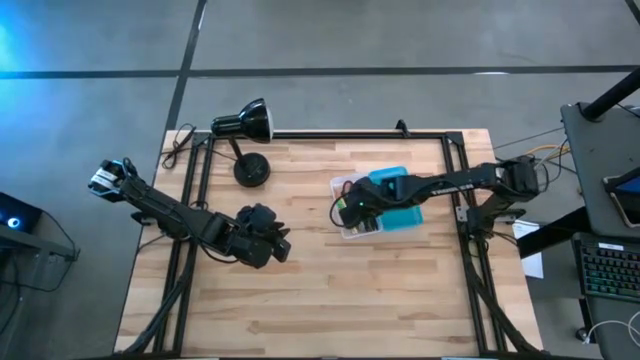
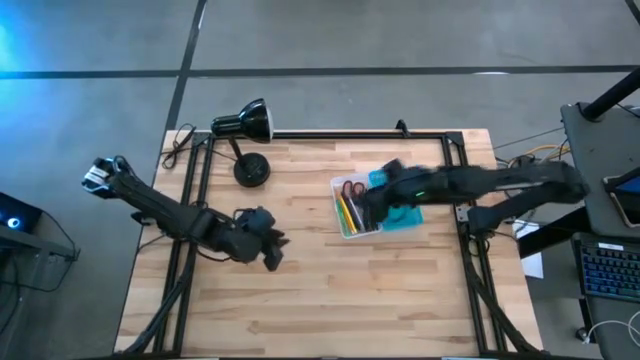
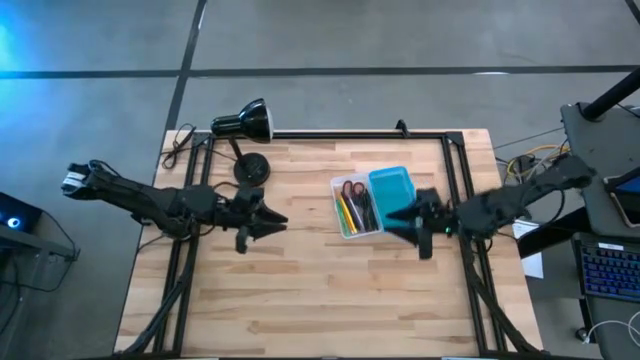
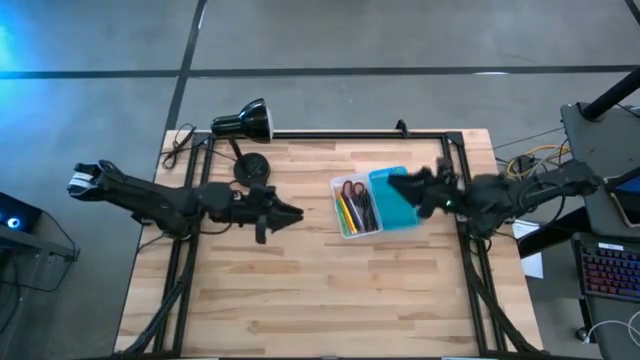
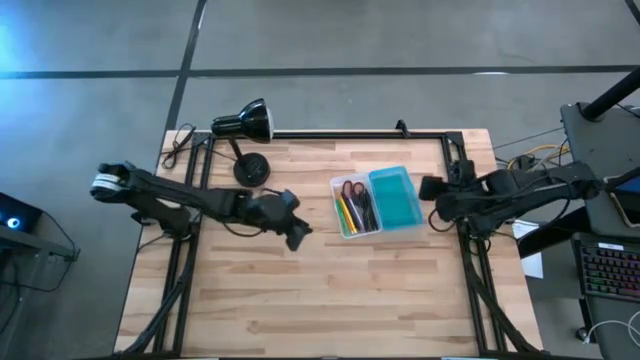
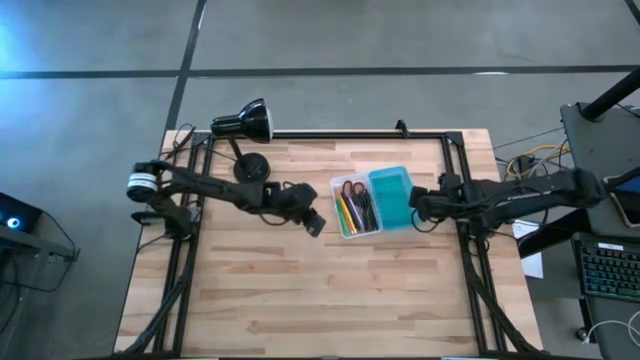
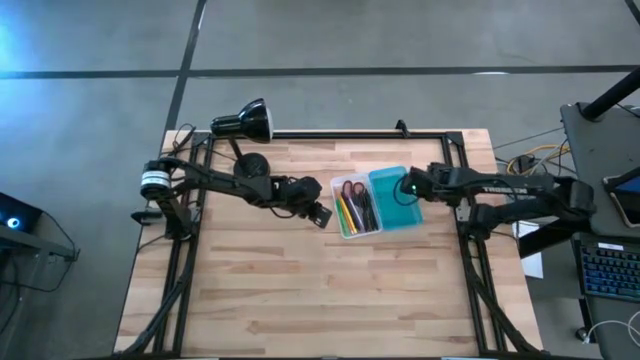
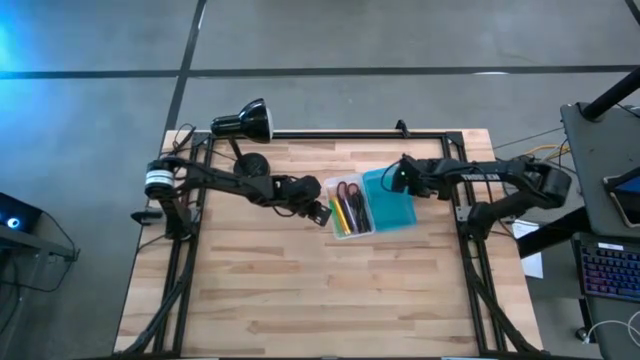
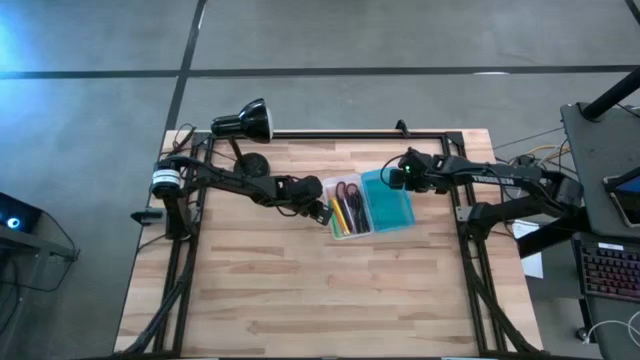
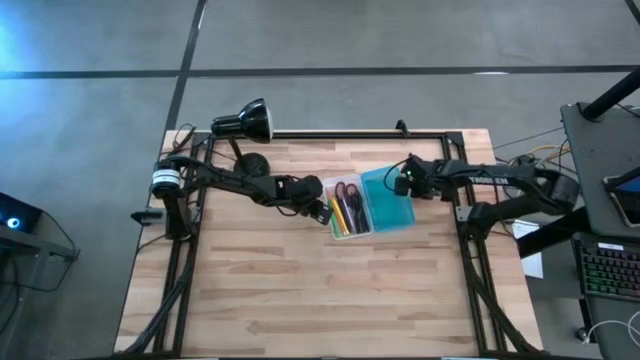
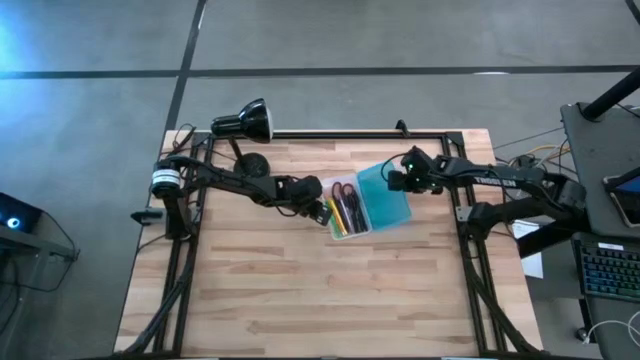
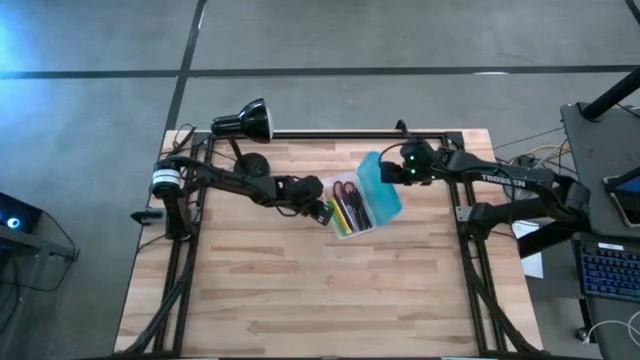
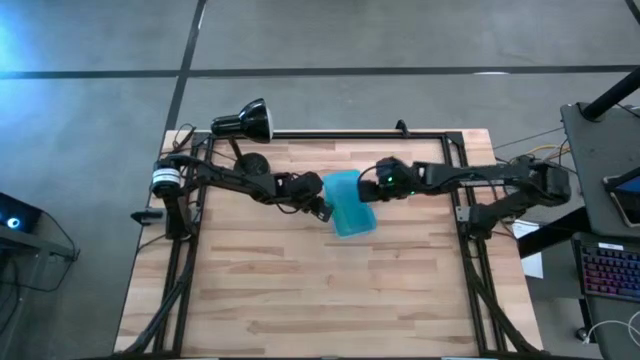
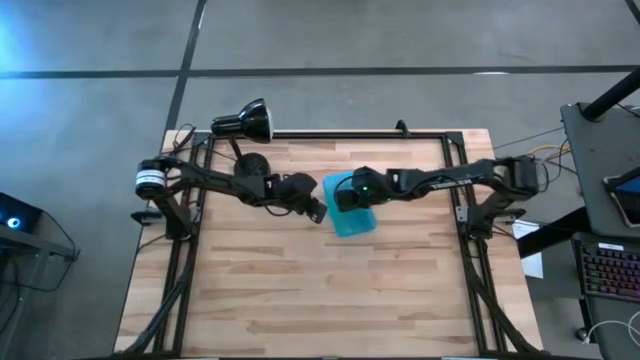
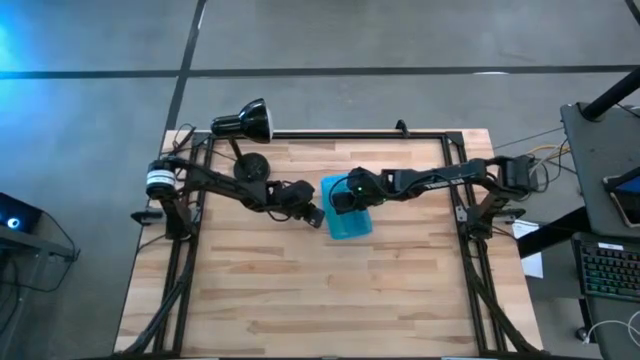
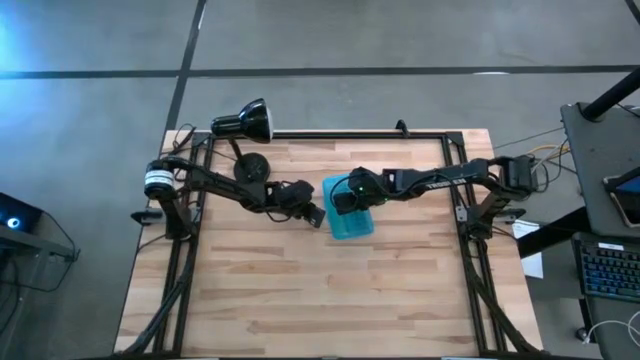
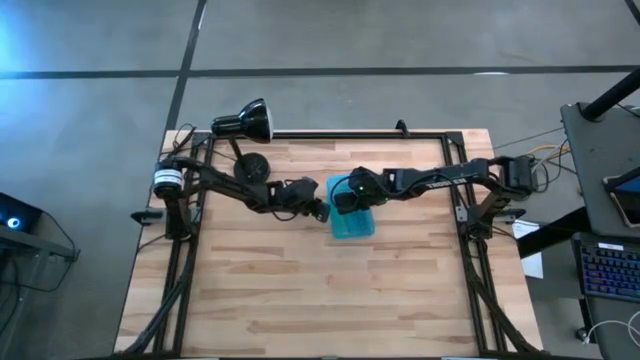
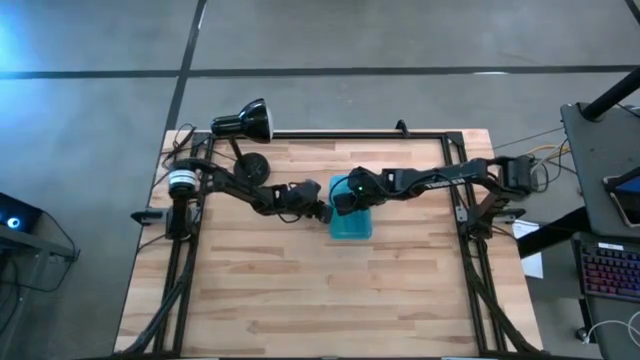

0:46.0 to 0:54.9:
Task: Pick & place school supplies into a supply box
Close the blue supply box

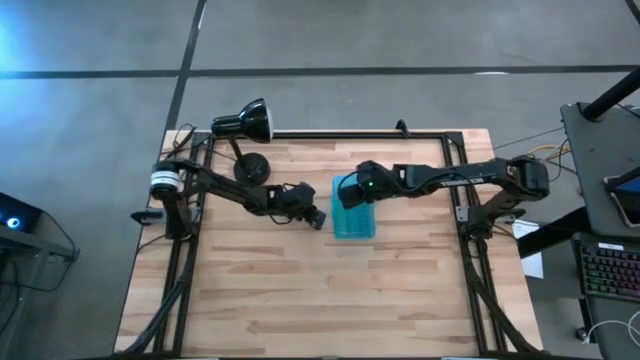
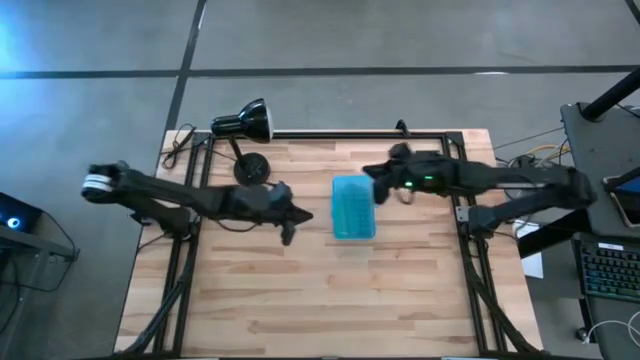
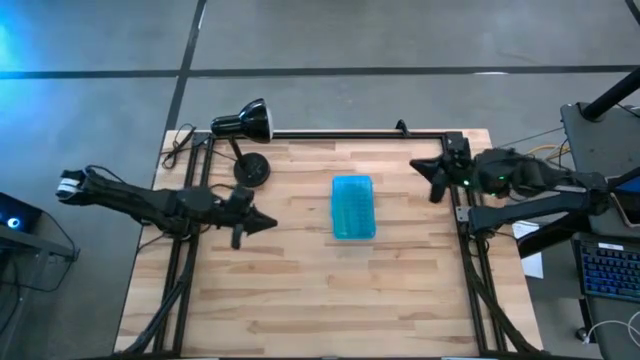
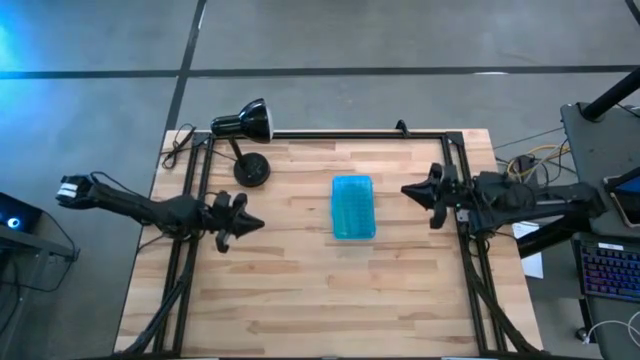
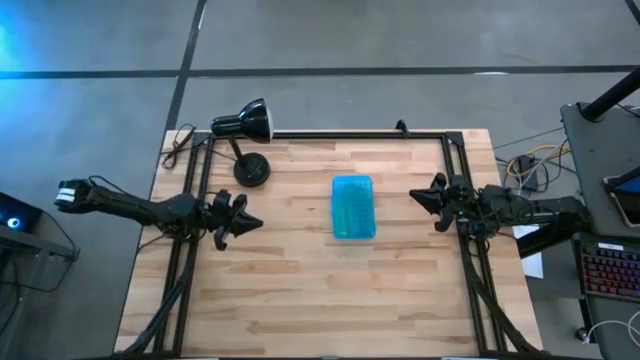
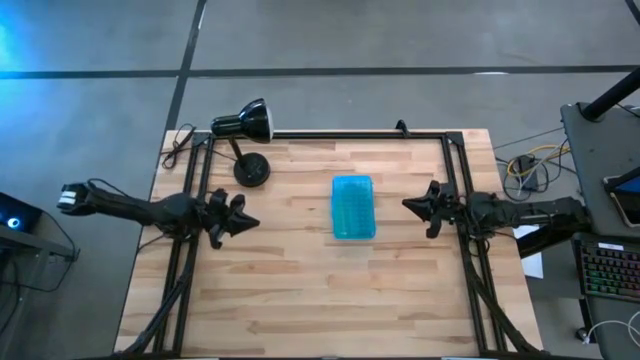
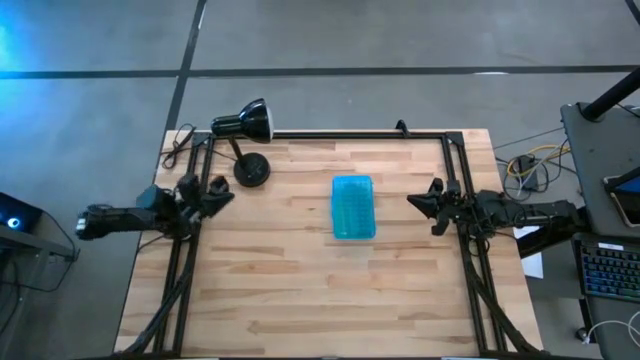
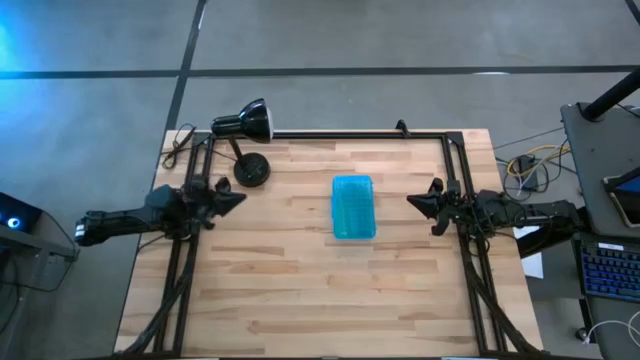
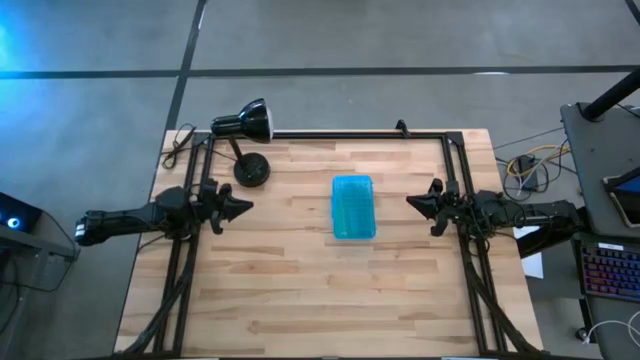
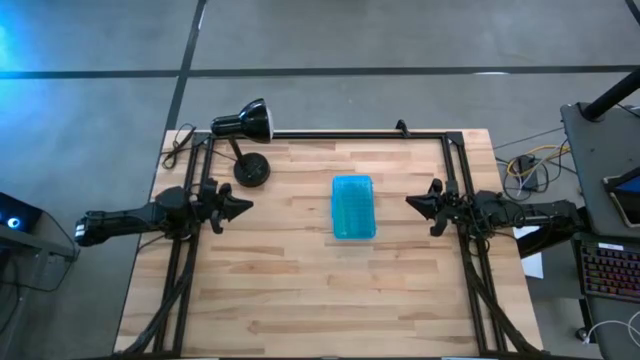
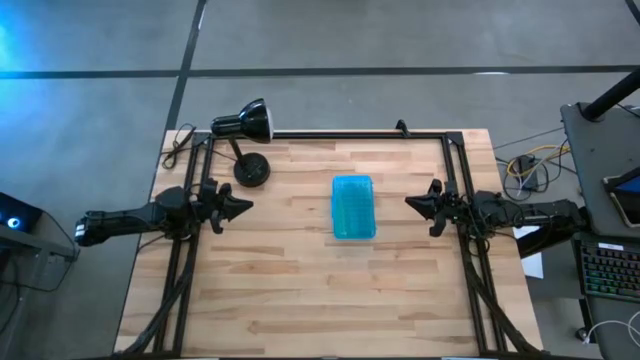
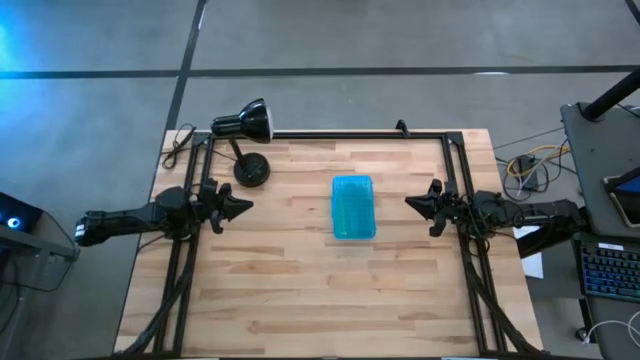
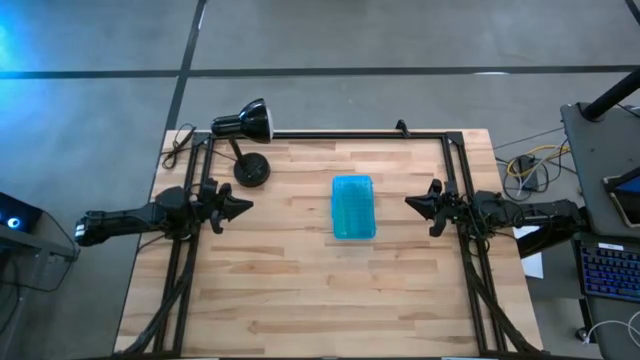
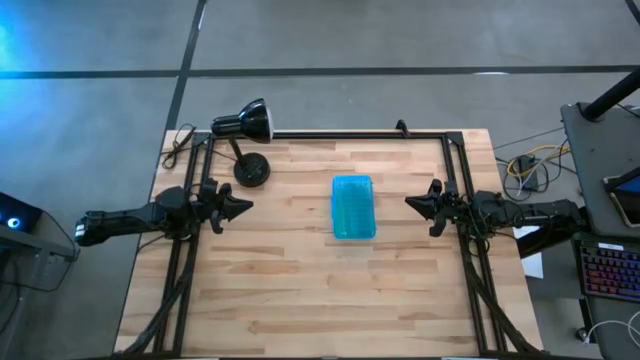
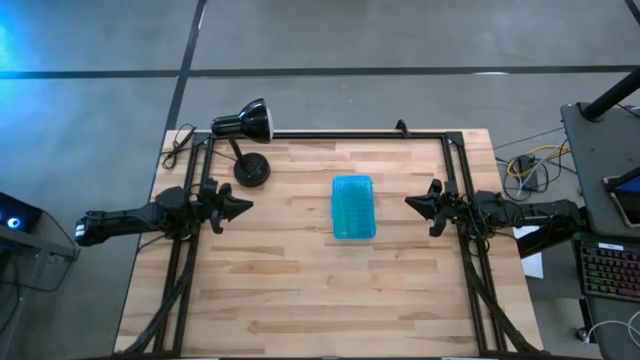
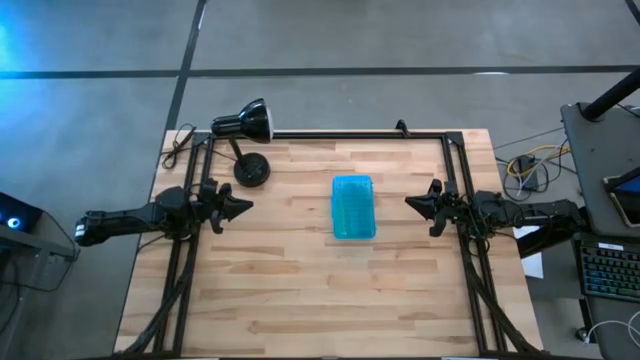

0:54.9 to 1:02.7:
Return to Home Position

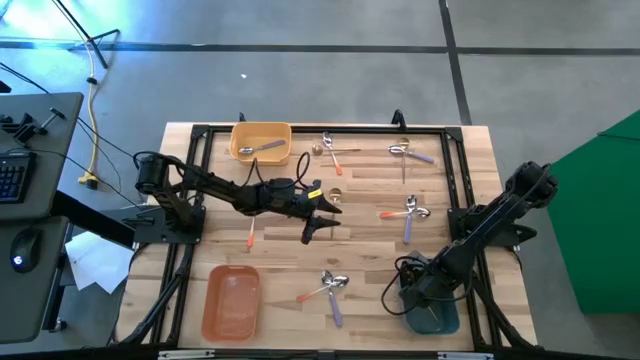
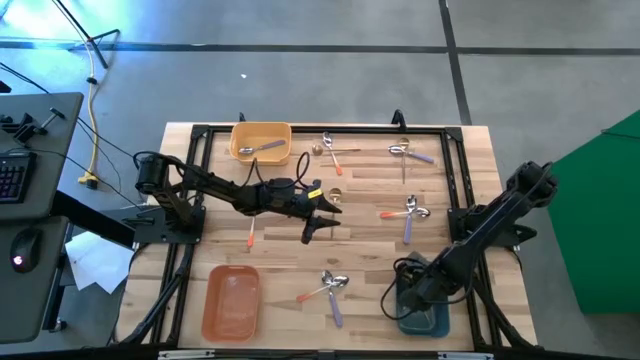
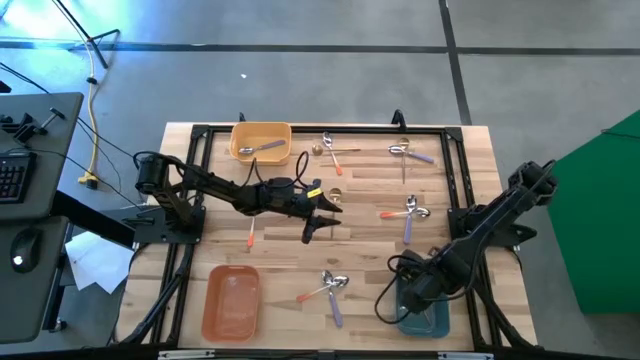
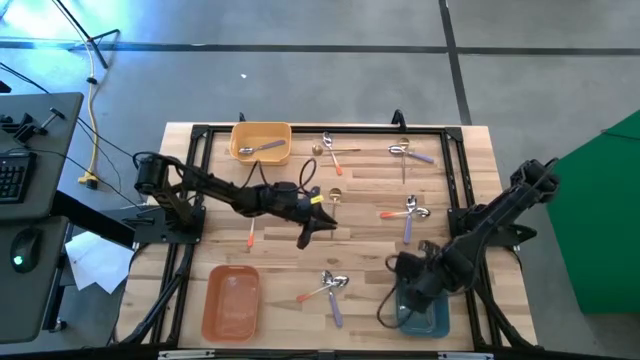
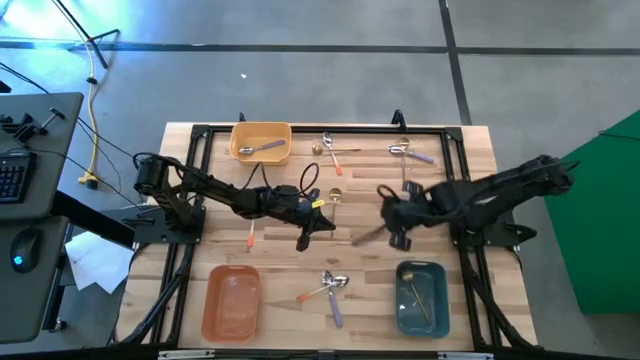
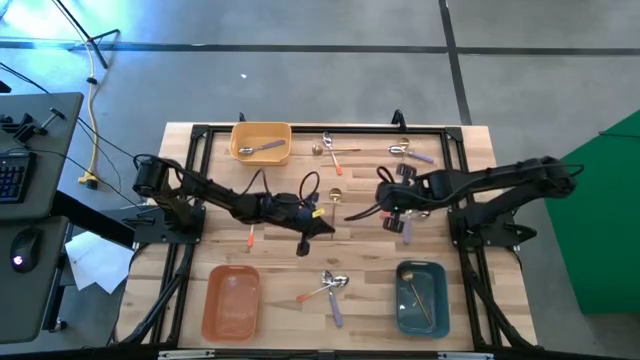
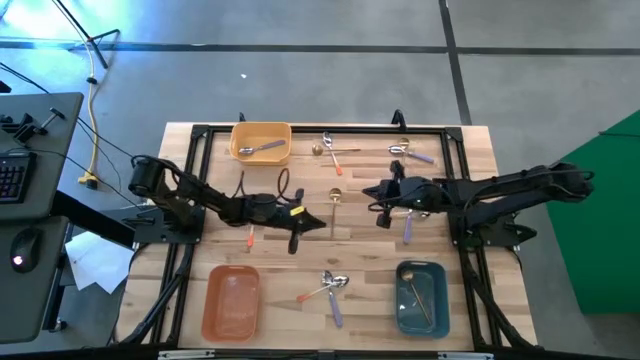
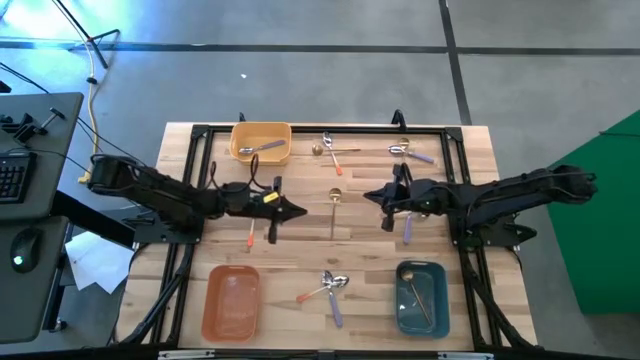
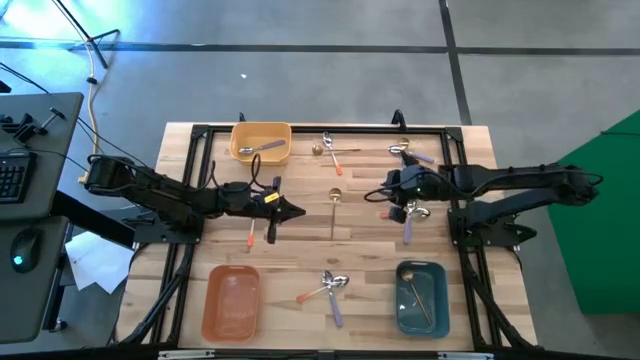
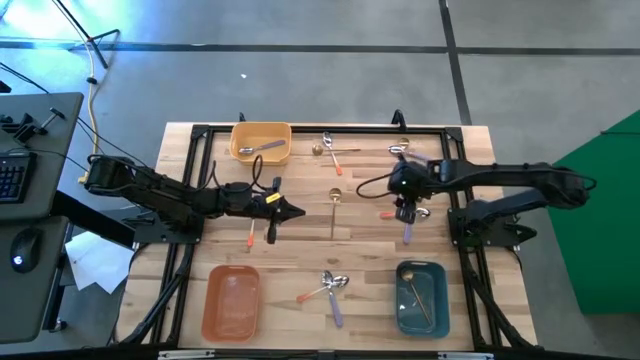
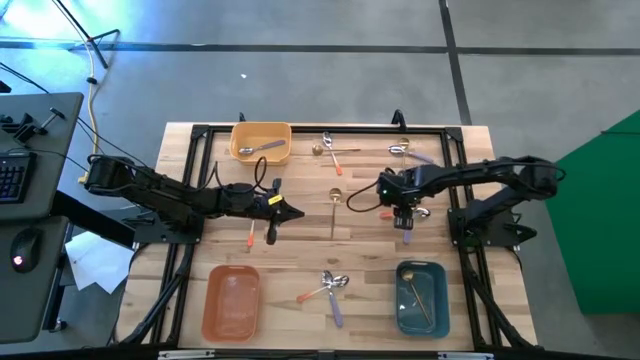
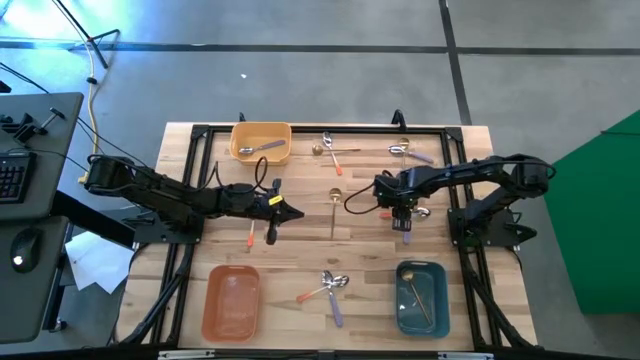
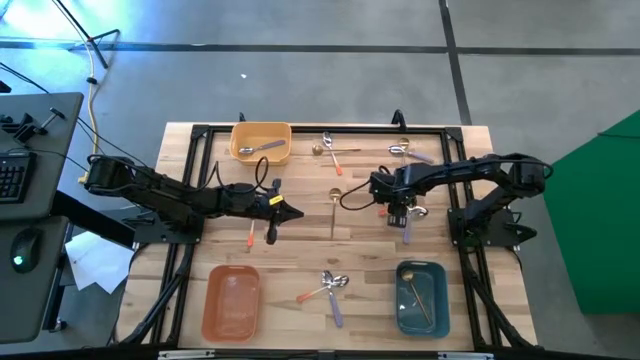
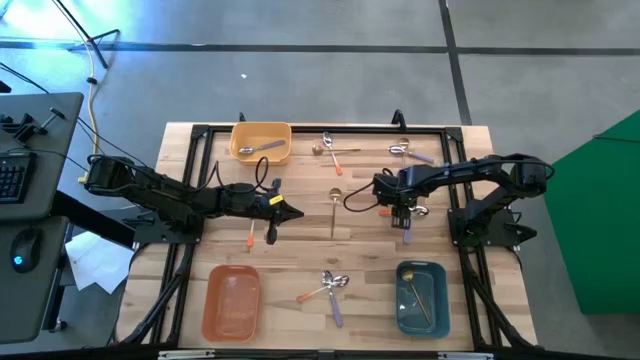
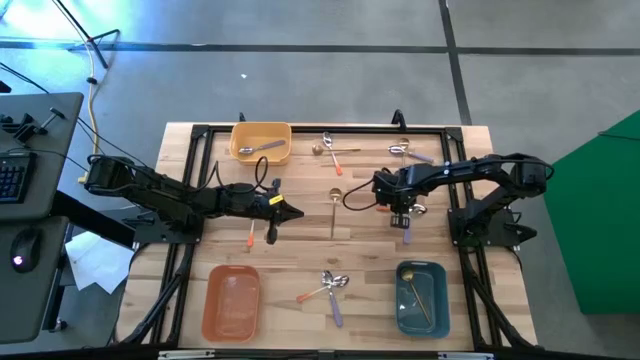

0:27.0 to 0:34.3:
Task: Sort silverware by color (type)
Put the orange spoon into the orange bin
